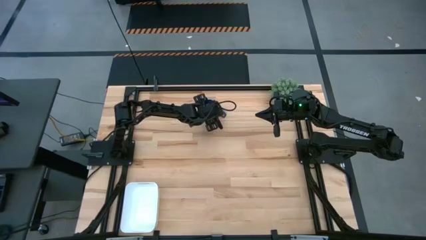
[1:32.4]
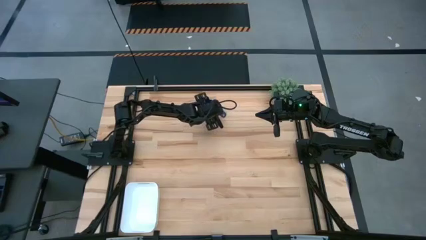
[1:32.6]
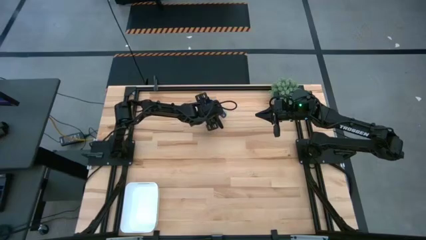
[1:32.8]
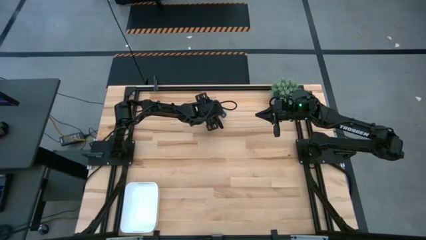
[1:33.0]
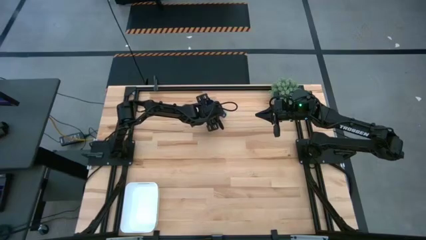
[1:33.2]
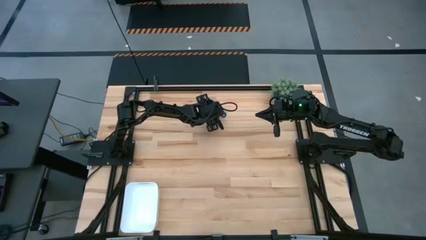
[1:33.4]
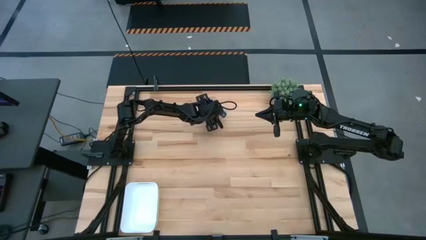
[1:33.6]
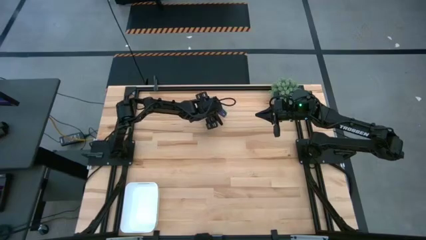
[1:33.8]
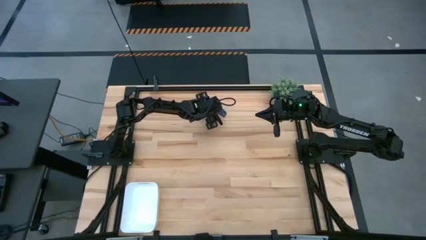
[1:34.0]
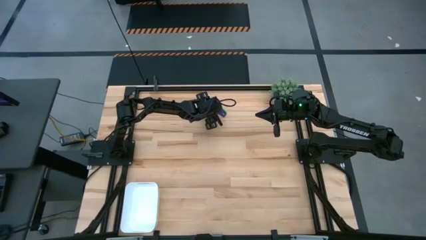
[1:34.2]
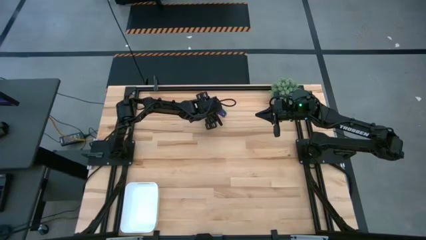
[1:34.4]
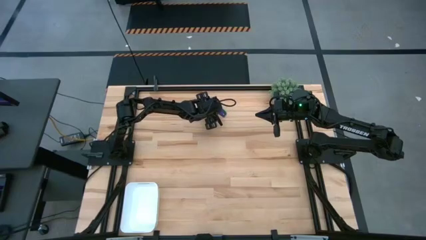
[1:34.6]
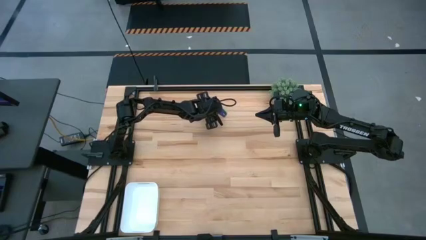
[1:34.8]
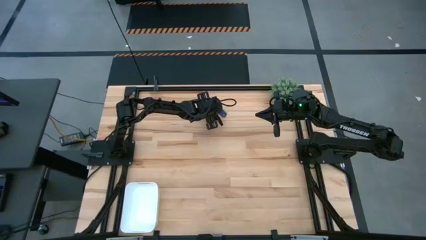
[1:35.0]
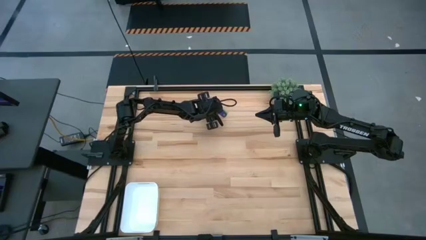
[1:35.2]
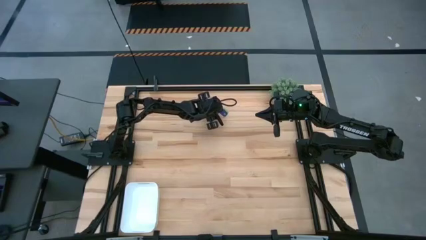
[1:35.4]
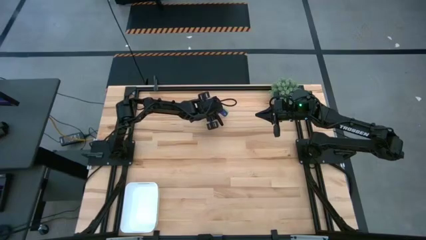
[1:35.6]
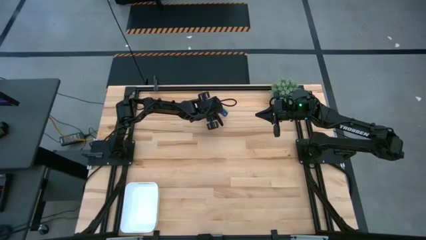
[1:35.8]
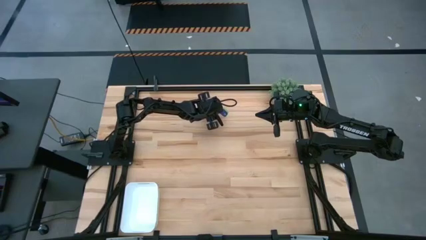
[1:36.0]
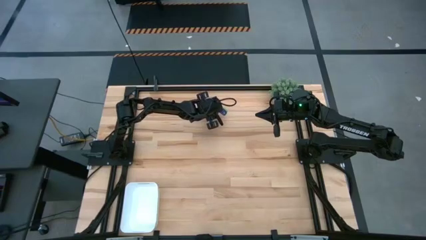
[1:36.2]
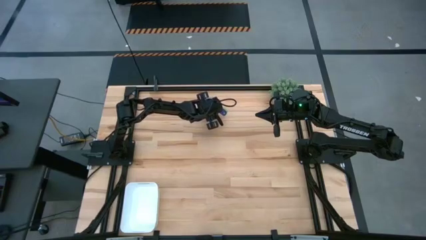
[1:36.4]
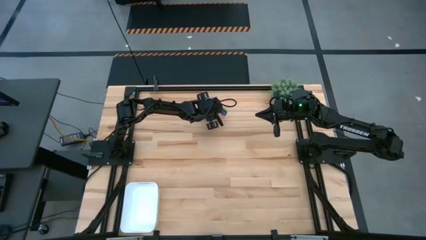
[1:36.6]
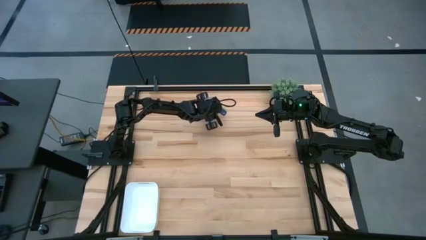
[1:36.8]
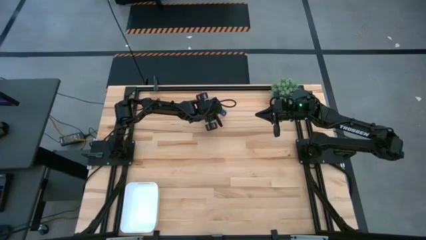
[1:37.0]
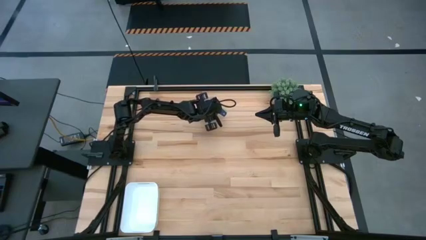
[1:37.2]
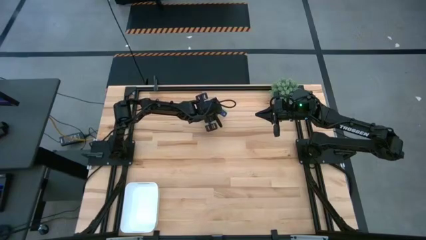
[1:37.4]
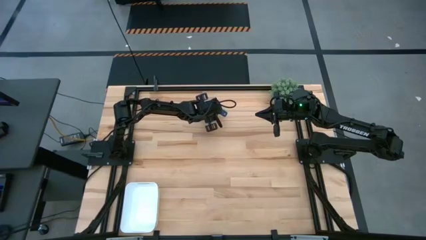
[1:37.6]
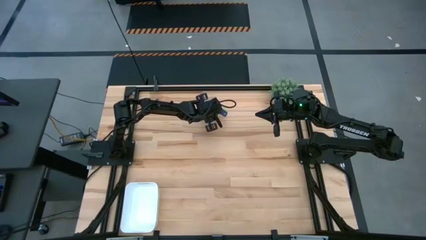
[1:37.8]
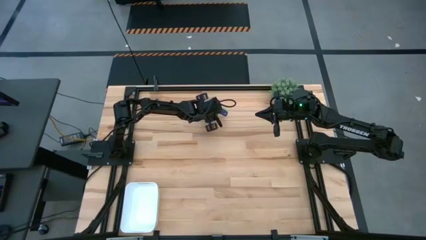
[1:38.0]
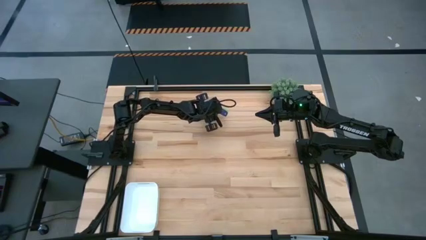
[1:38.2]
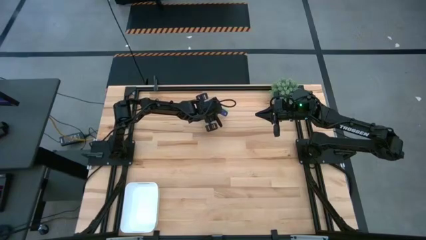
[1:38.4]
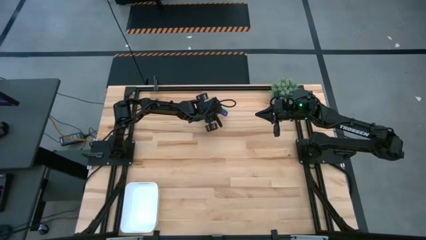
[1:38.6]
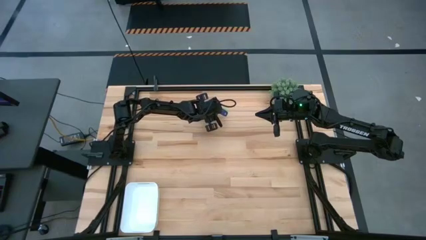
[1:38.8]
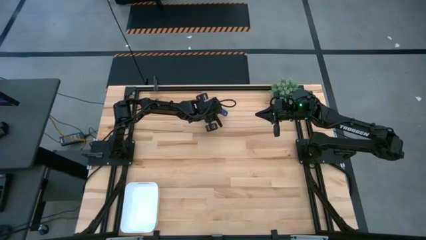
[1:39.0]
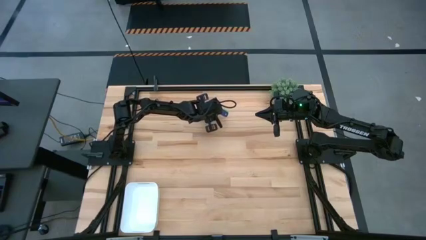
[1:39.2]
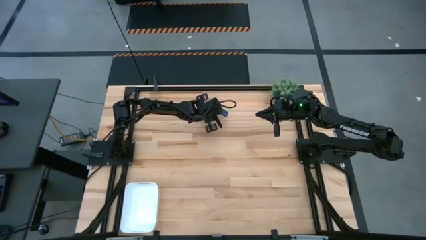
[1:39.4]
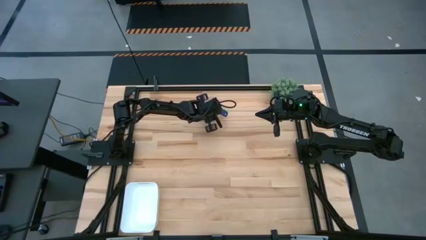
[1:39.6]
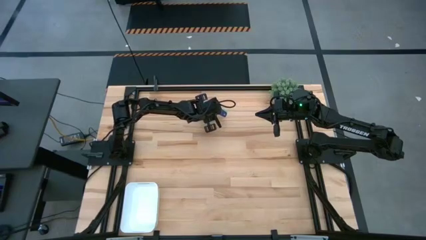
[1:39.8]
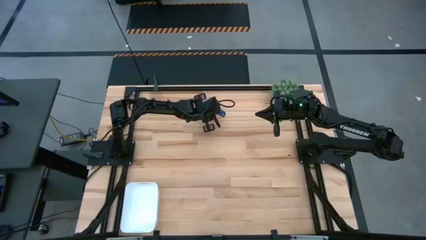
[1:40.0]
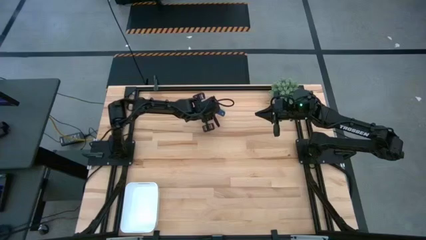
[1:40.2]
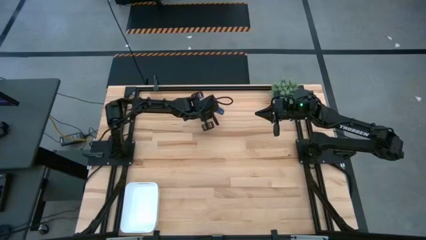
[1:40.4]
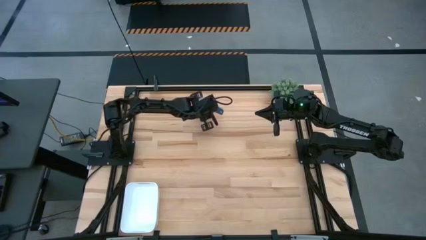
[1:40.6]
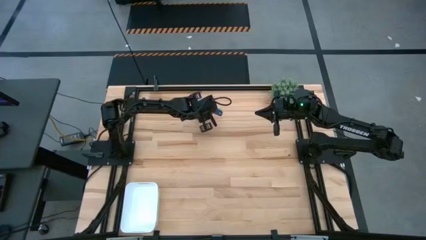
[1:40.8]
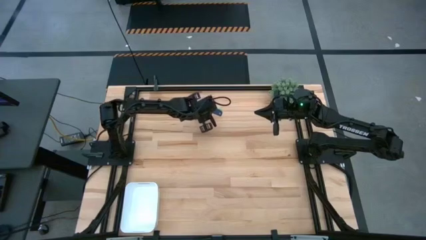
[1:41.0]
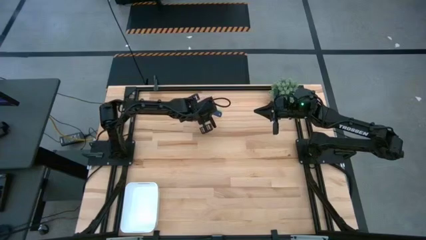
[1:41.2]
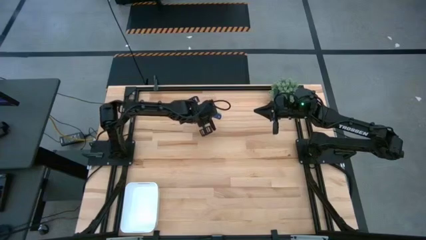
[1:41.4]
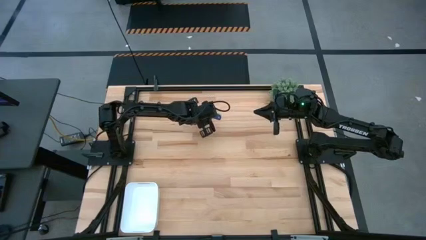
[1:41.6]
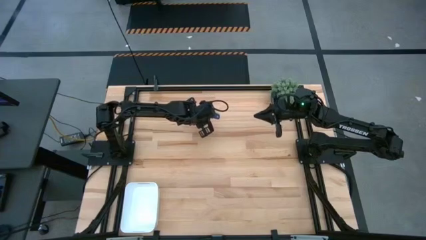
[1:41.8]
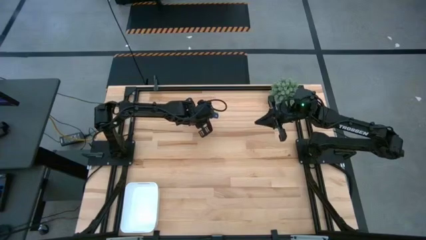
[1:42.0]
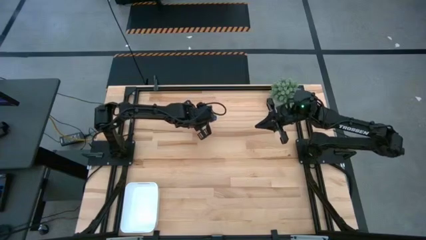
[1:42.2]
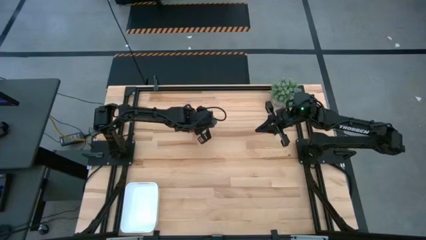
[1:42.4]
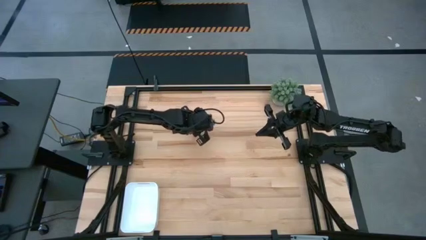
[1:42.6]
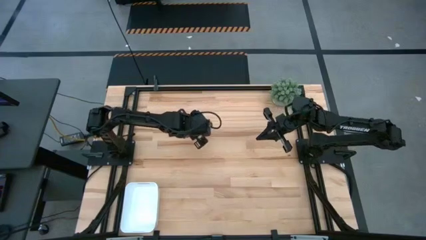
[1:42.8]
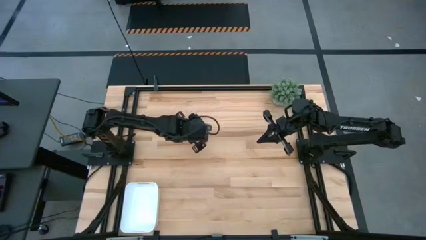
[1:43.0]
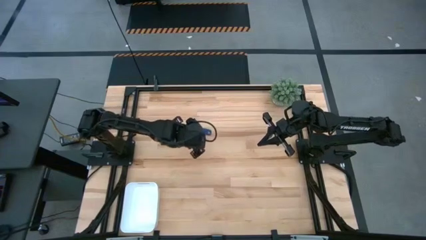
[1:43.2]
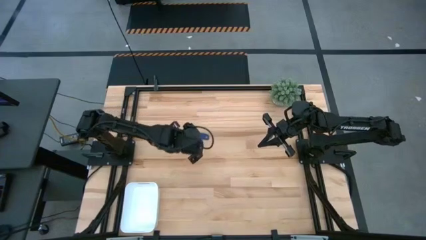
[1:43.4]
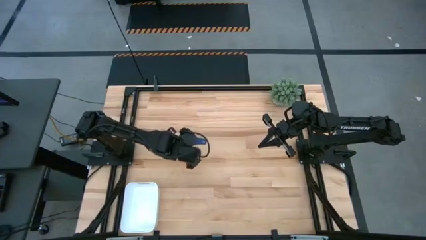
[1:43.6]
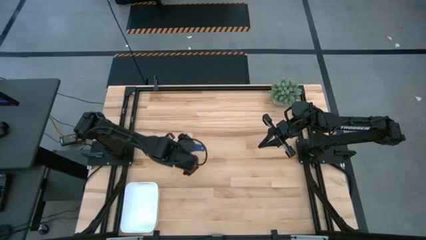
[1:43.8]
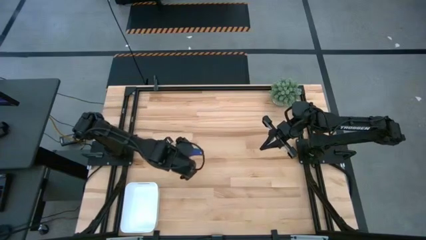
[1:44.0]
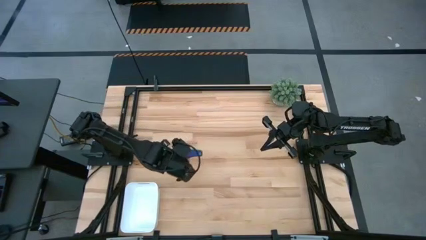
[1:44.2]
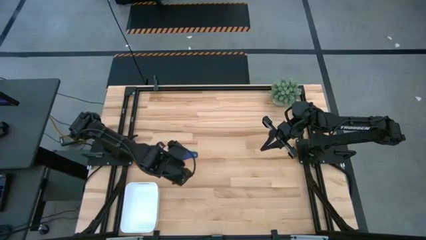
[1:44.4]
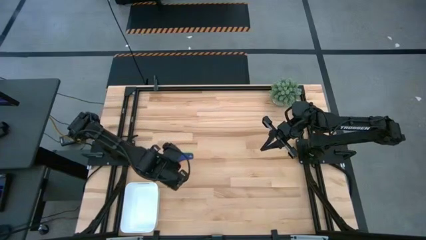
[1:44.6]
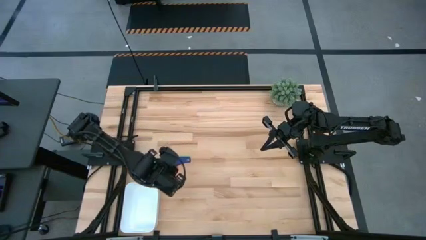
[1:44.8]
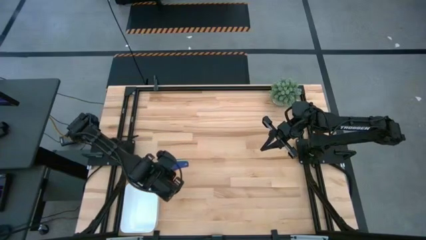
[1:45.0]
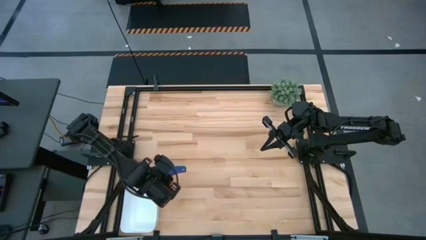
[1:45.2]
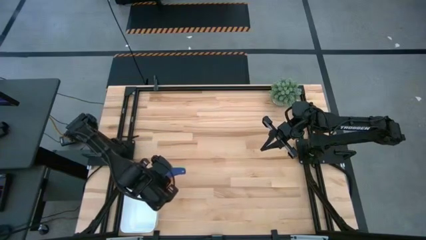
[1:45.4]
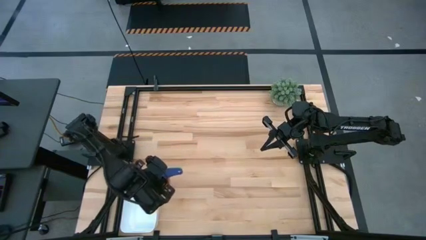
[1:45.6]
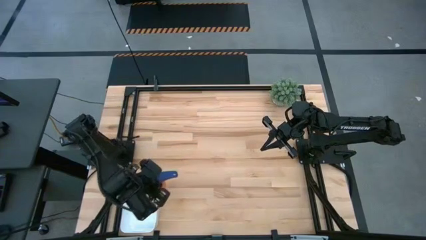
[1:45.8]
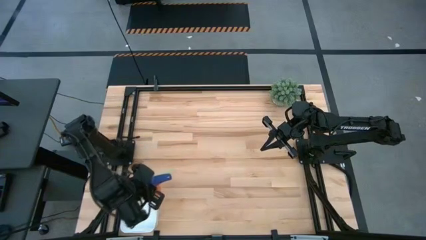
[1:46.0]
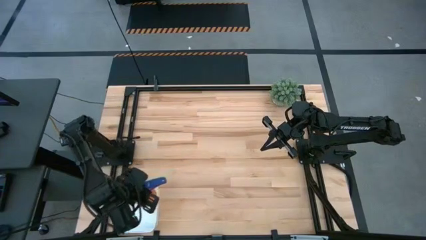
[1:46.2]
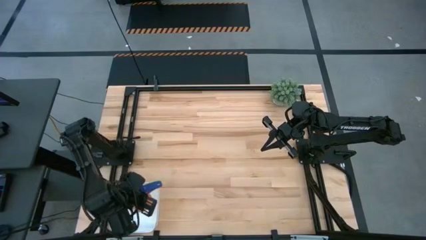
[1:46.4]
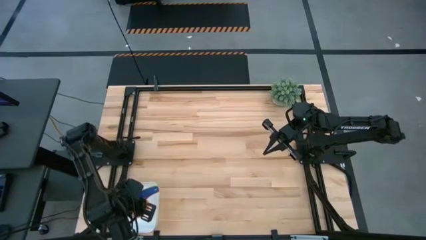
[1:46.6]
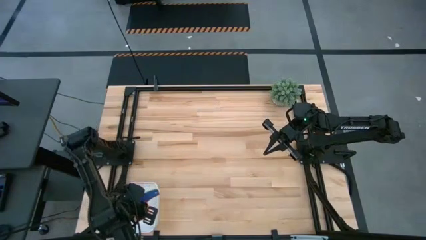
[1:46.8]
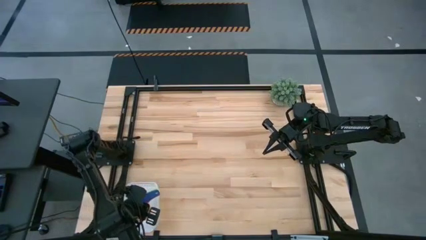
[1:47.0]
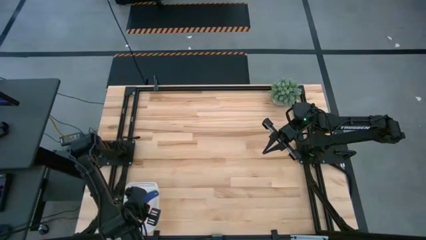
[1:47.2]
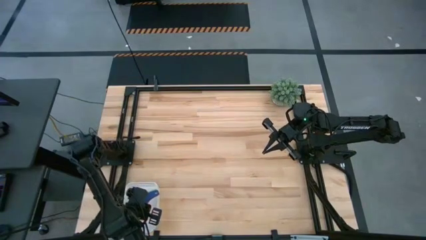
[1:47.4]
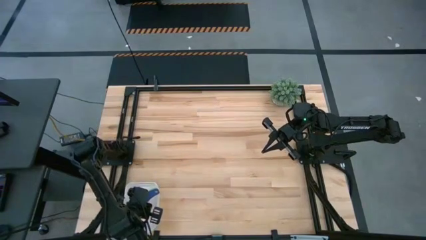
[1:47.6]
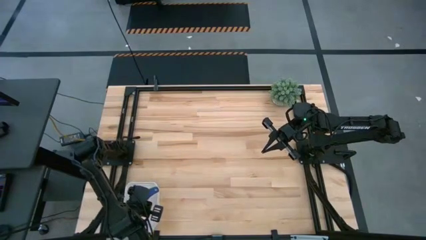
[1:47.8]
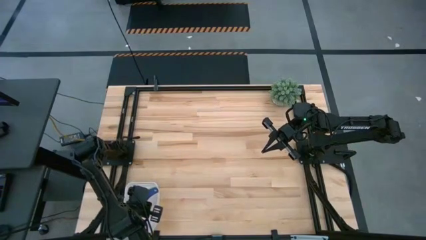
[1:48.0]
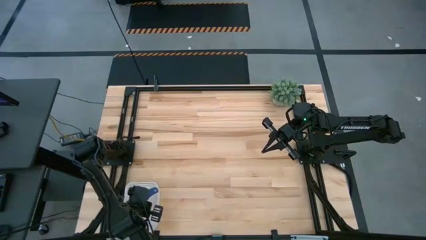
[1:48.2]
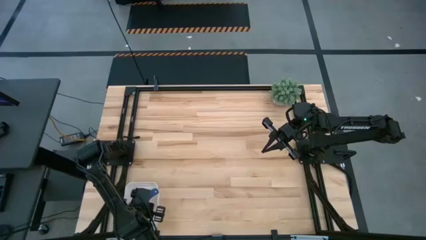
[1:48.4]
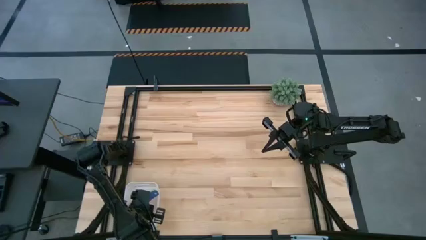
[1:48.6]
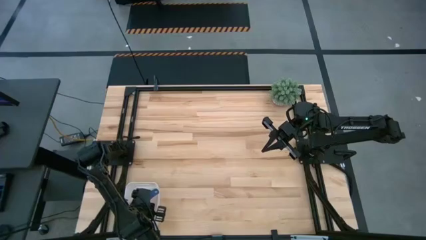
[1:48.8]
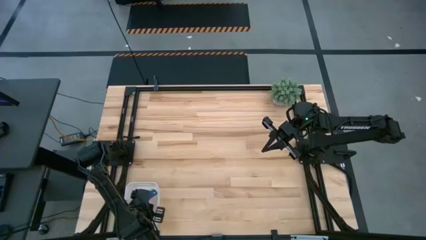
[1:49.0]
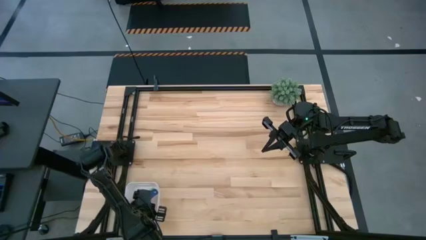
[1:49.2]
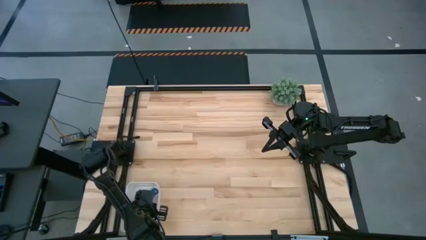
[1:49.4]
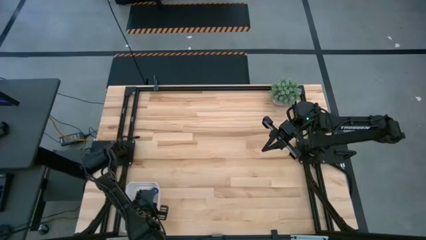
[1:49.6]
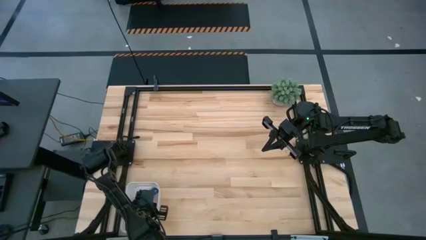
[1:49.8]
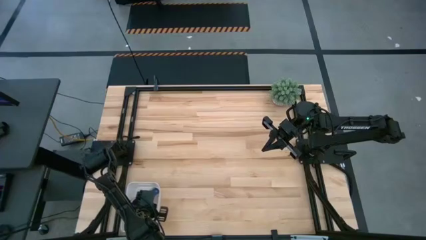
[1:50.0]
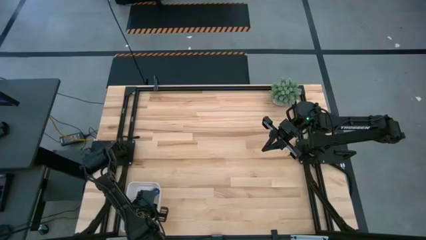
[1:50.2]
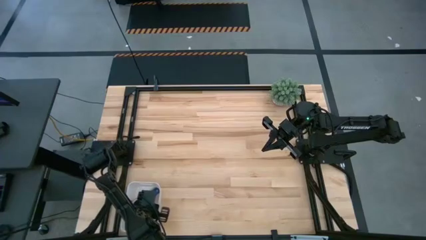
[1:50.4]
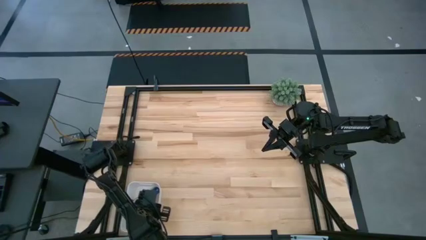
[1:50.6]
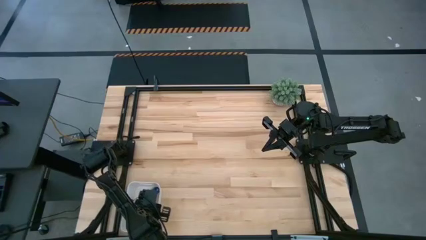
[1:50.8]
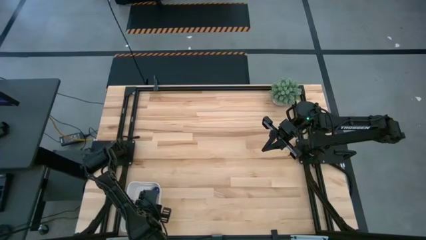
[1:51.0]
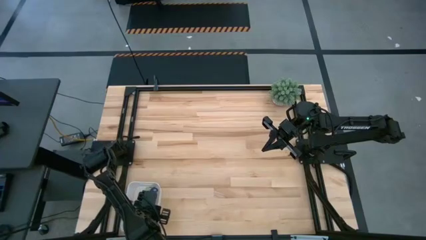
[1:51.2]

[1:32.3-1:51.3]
Task: Nest measuring cups in basket
Put the stacked measuring cups into the white bin
